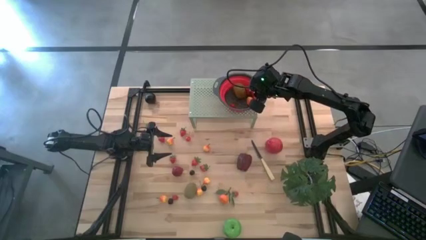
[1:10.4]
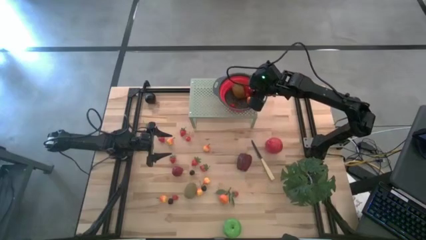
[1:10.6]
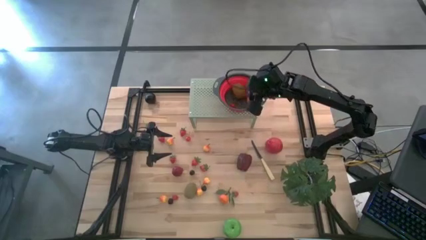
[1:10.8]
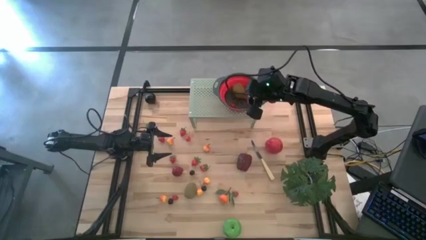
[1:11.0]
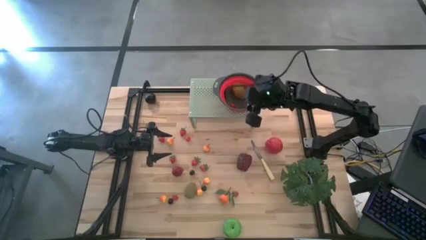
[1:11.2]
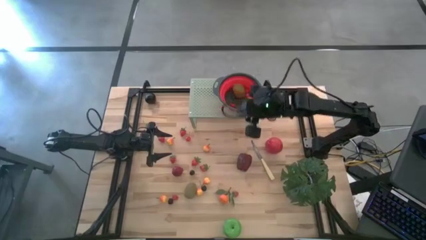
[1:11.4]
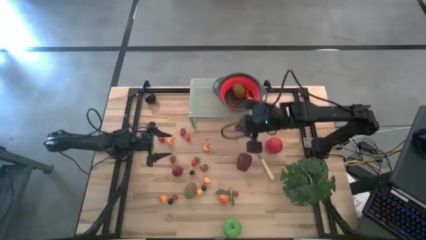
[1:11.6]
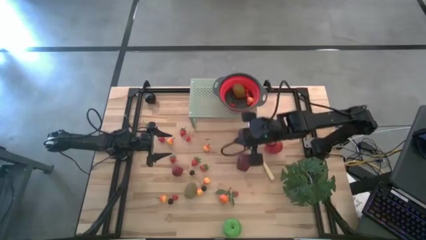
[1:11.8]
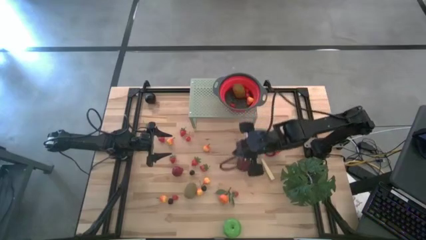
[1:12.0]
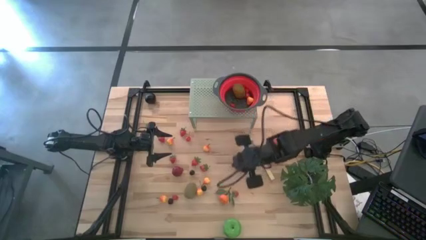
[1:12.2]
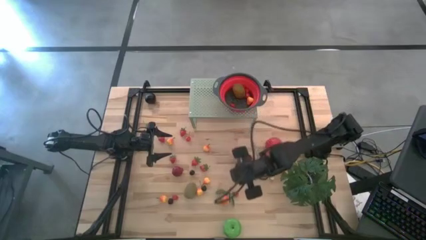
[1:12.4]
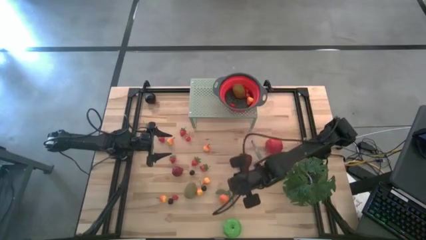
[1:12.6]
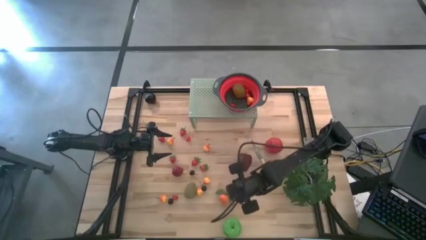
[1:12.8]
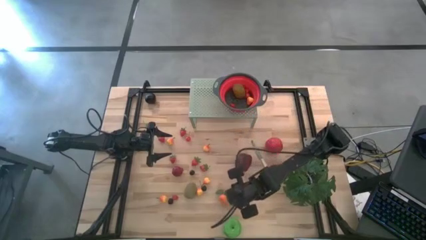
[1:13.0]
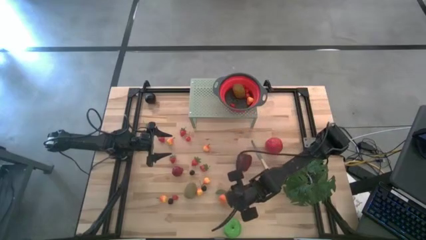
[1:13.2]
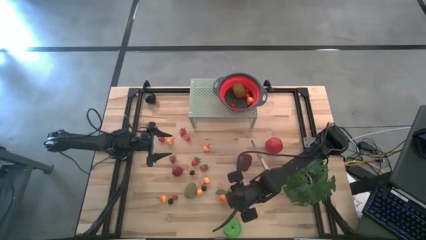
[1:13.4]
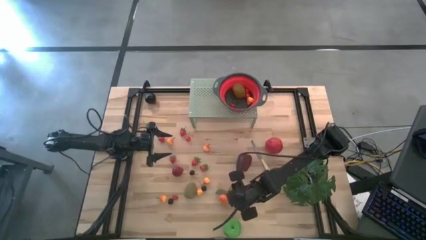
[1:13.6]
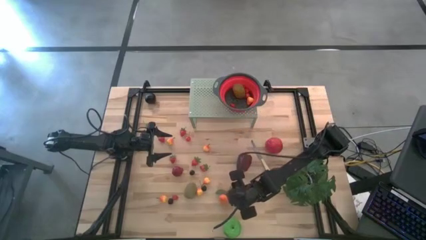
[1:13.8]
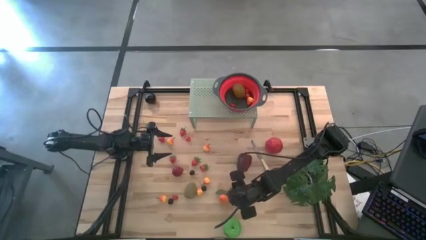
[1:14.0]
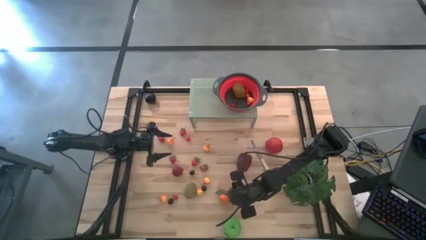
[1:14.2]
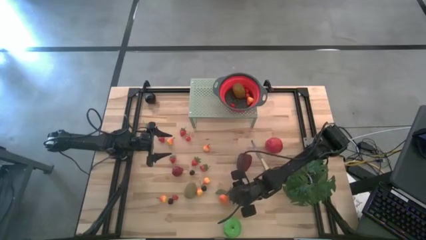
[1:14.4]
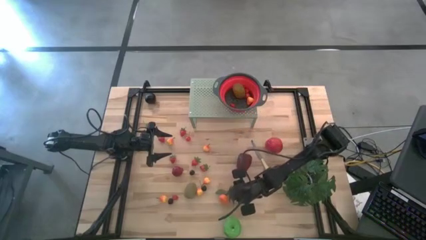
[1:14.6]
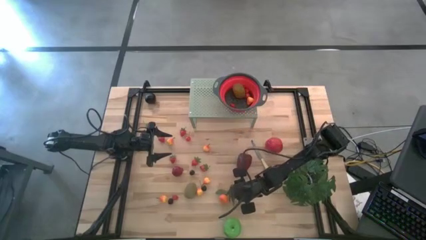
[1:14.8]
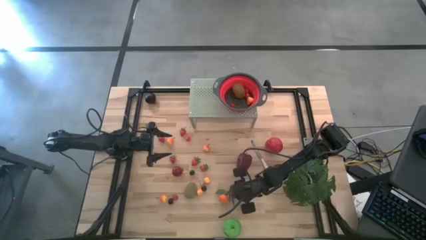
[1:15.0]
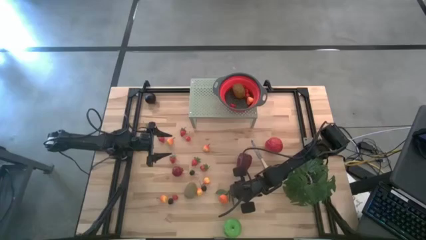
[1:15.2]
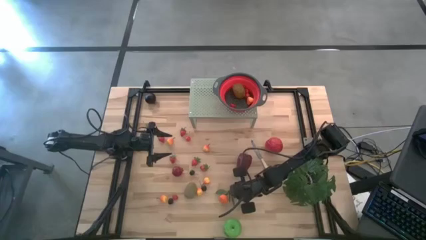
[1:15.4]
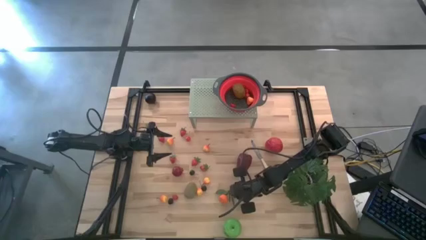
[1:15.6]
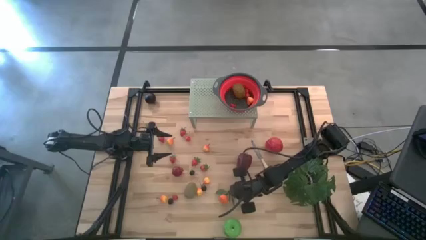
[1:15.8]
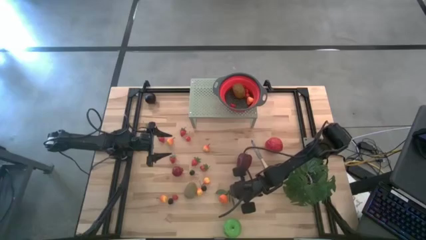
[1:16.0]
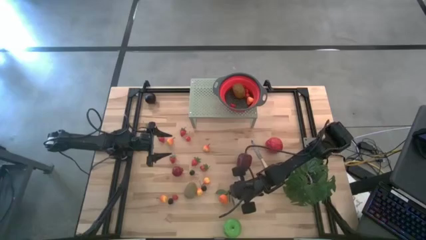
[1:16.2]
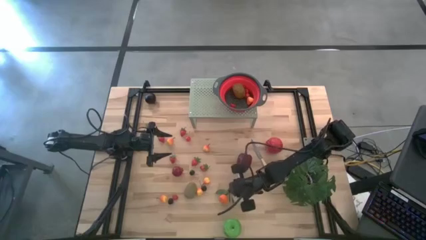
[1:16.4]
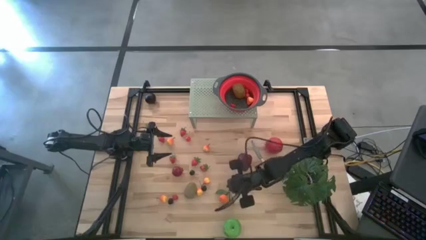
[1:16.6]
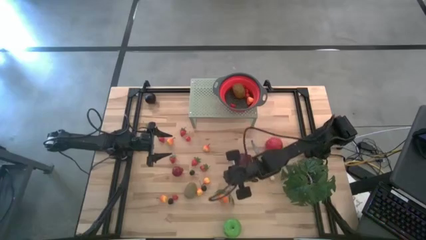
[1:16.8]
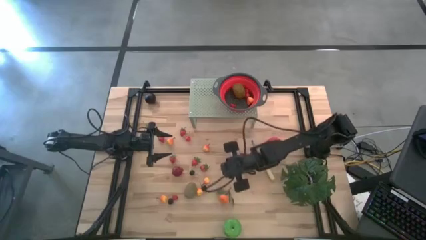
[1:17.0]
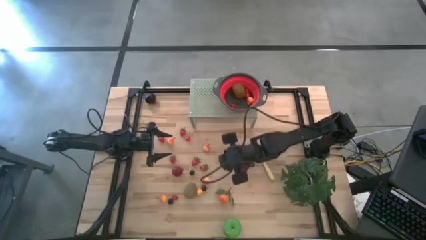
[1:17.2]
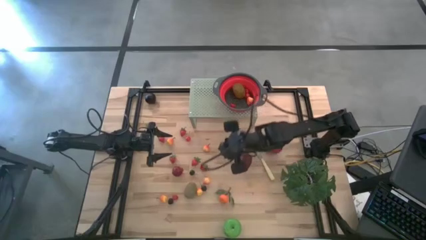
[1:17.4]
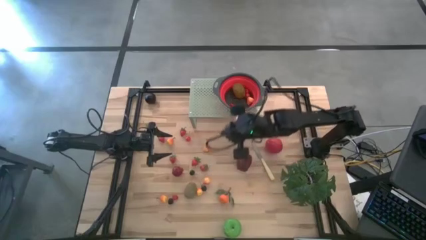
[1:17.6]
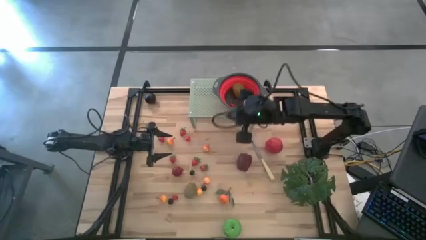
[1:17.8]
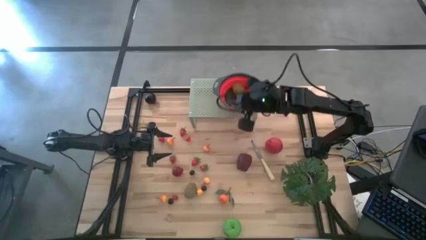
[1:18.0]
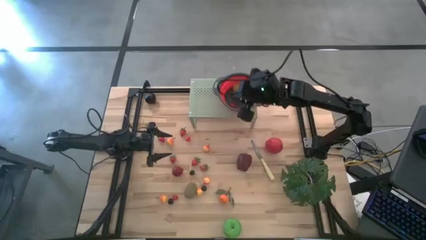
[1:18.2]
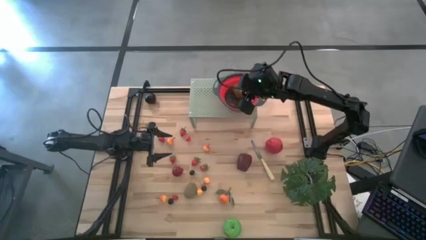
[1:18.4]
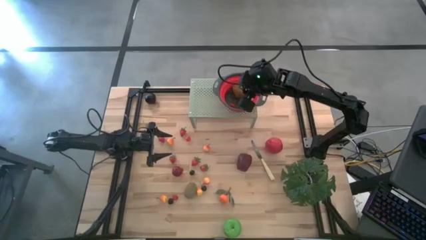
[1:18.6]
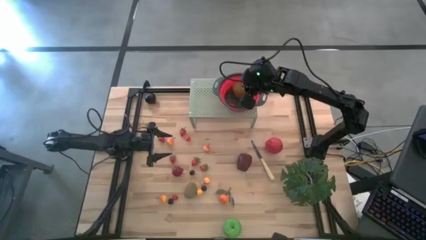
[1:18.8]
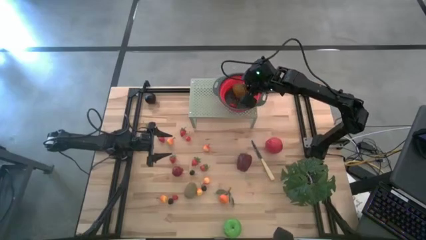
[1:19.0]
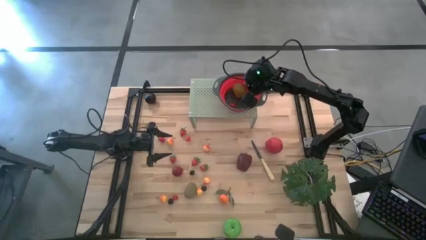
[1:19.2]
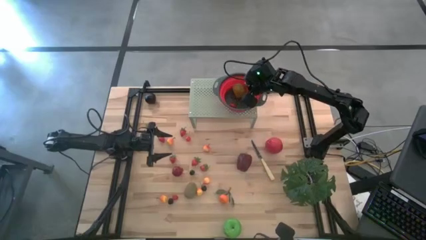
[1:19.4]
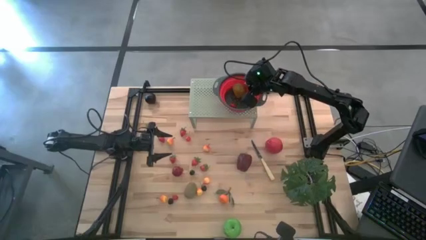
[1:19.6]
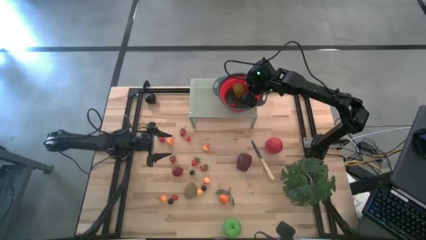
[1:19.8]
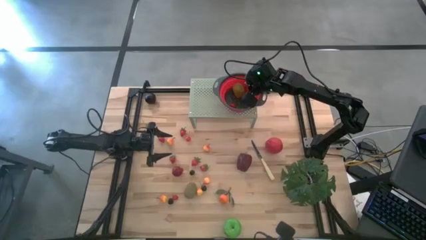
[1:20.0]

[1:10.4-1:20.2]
Task: Pick & Place Fruit
Put the red strawberry into the black strainer bowl on the shelf

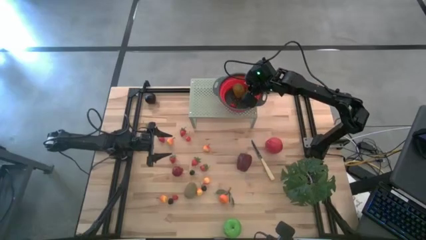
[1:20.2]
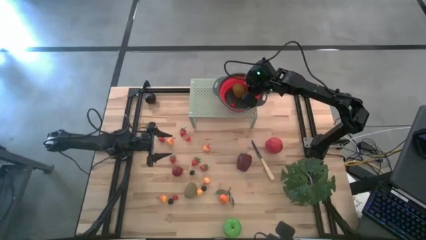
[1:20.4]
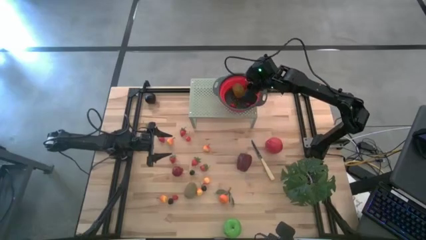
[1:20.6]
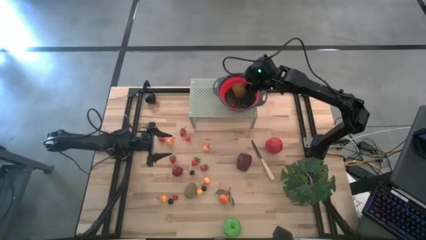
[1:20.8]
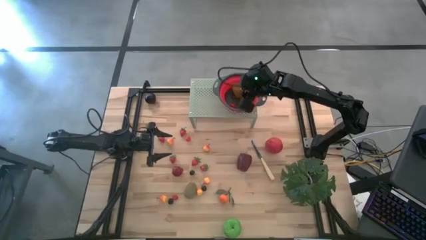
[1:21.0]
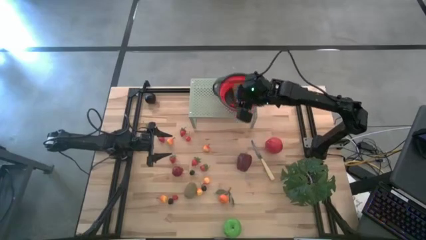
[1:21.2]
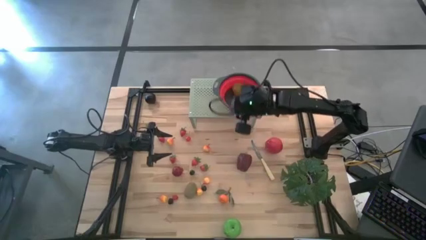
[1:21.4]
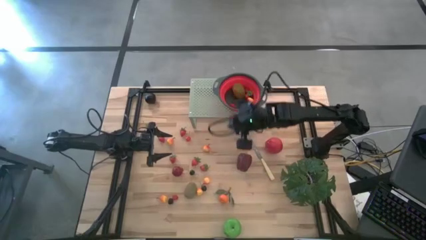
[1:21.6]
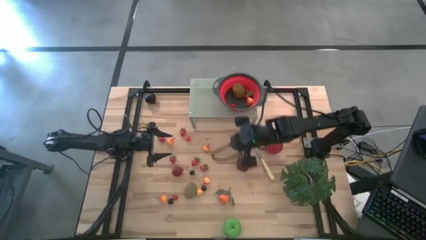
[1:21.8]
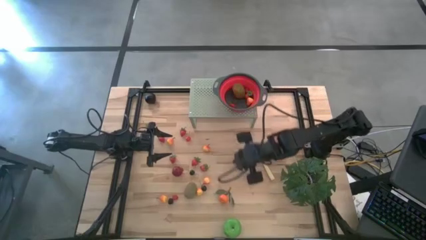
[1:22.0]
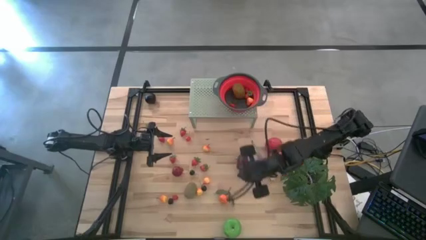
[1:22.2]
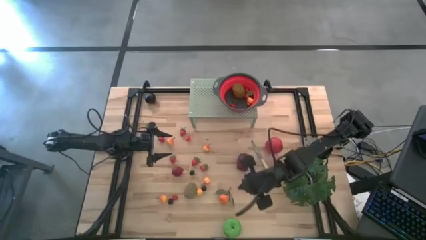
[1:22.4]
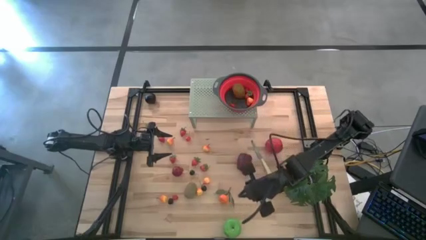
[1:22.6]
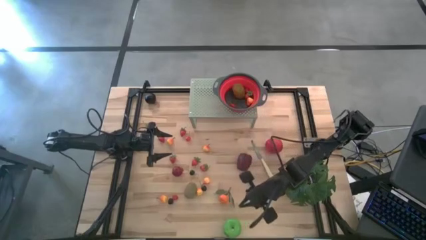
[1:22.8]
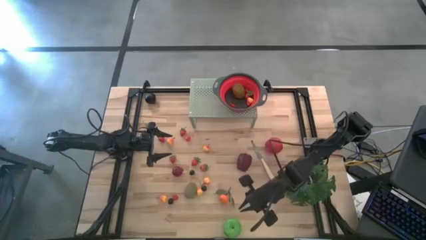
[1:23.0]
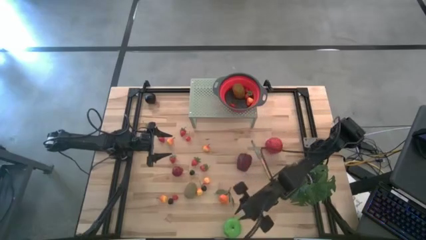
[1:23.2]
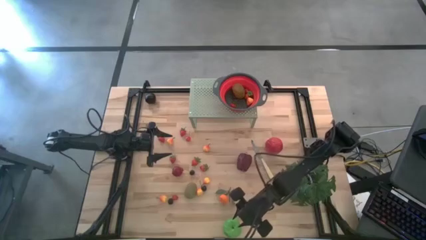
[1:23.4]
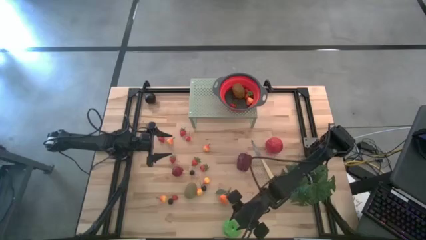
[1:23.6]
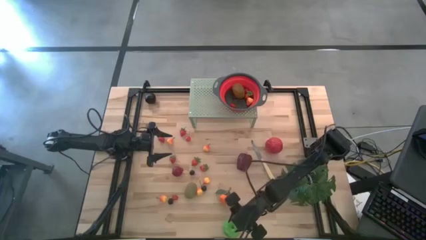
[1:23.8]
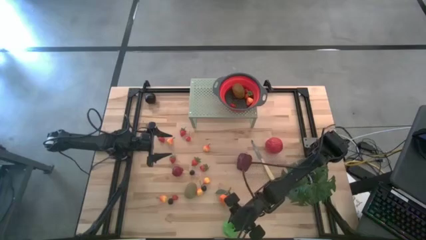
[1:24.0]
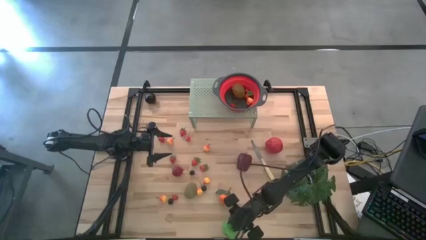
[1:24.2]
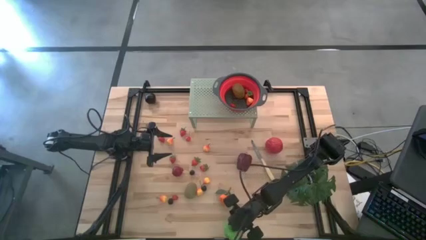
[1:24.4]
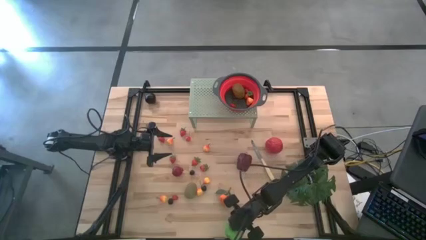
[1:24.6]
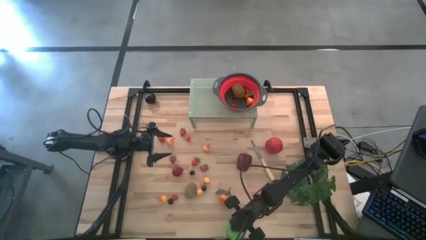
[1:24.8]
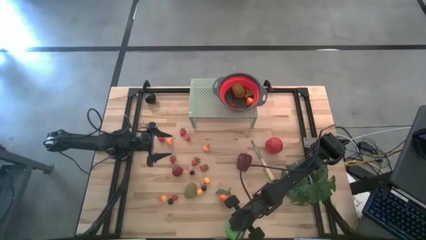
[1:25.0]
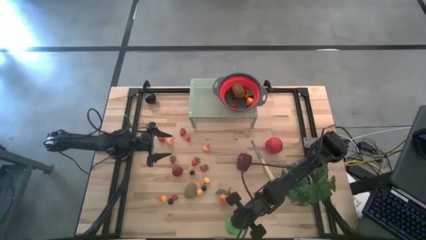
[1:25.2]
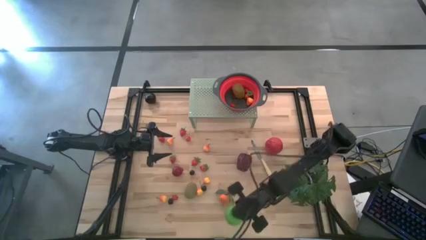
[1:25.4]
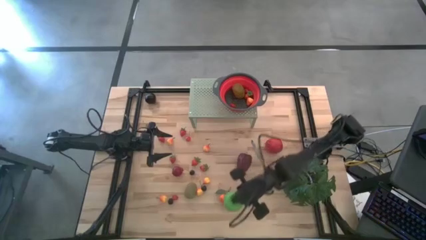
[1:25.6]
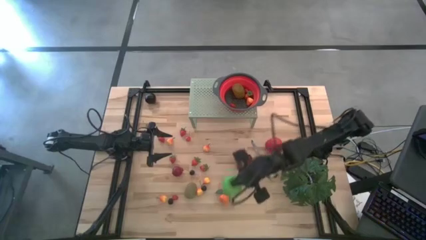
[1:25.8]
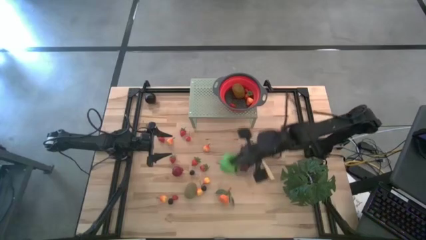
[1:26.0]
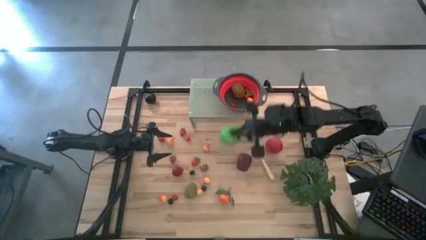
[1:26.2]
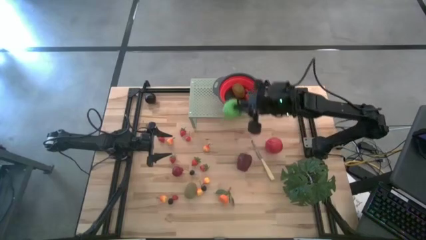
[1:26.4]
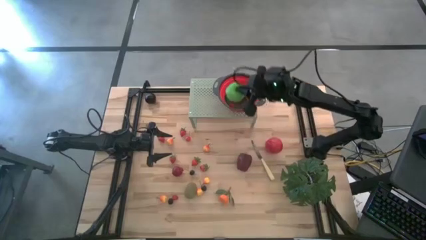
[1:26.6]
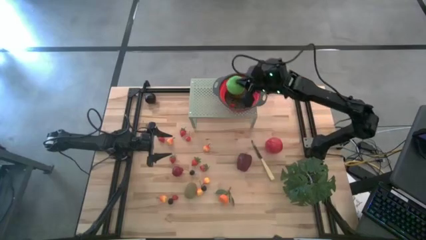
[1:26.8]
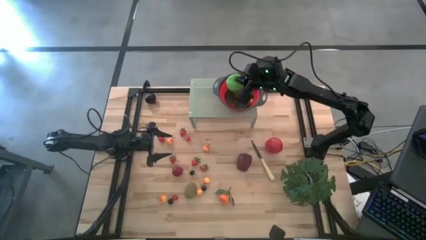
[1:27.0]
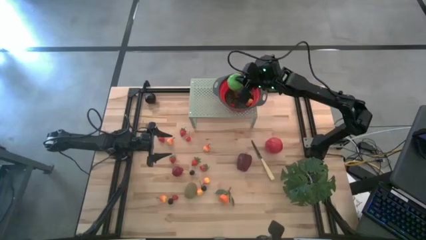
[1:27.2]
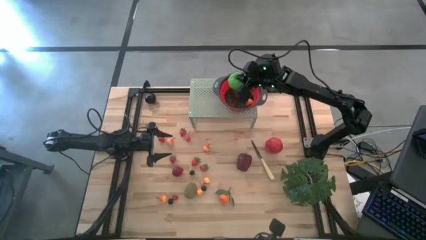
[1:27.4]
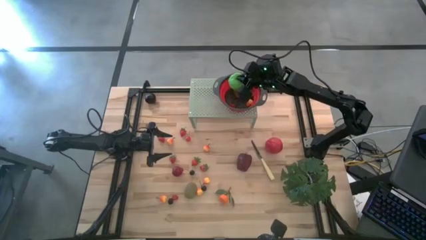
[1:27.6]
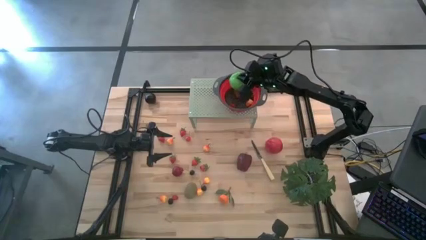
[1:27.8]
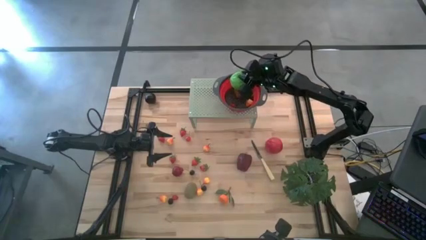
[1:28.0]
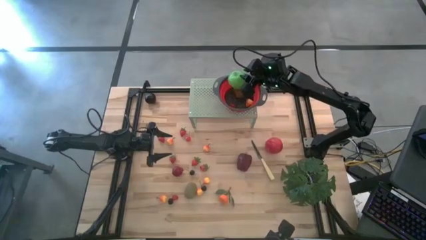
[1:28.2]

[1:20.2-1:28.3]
Put the green apple into the black strainer bowl on the shelf
